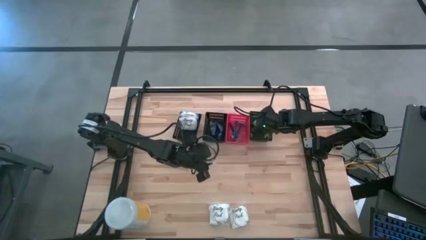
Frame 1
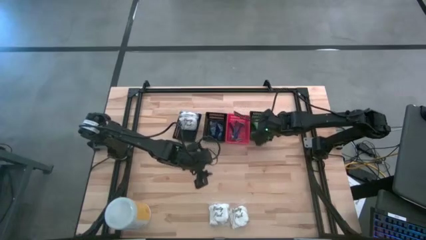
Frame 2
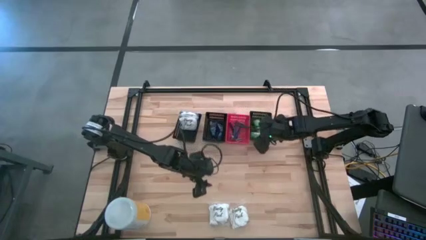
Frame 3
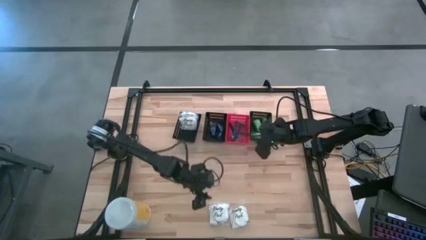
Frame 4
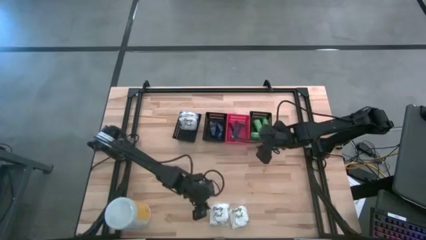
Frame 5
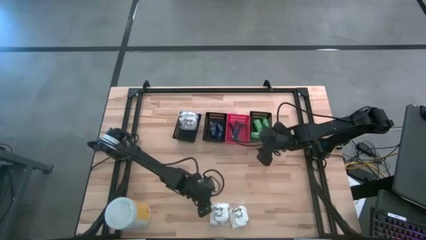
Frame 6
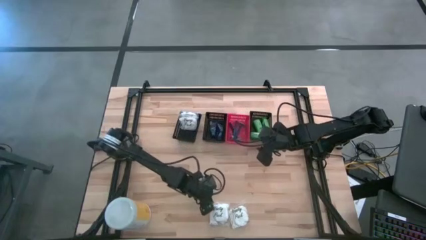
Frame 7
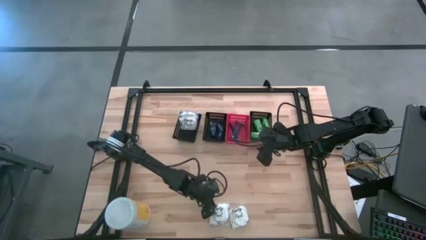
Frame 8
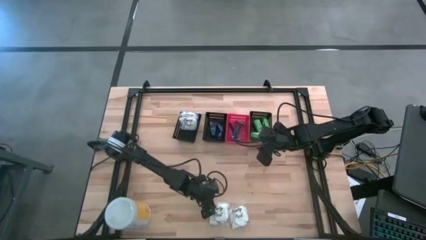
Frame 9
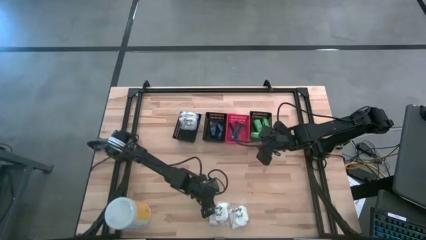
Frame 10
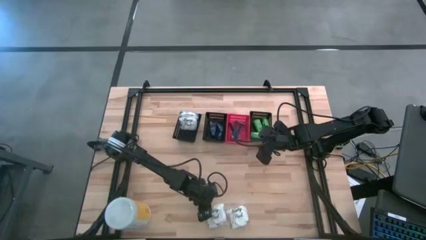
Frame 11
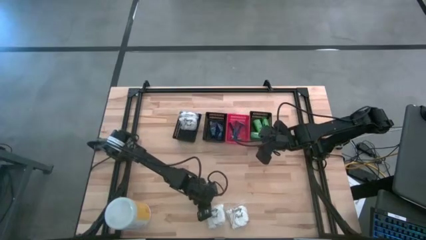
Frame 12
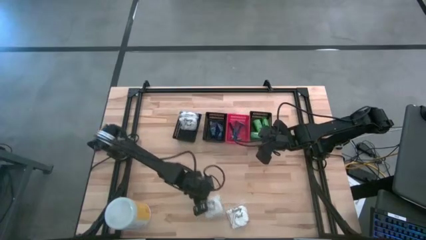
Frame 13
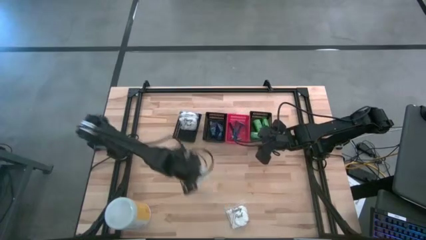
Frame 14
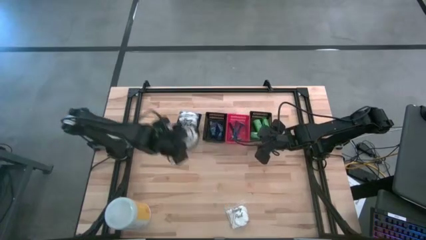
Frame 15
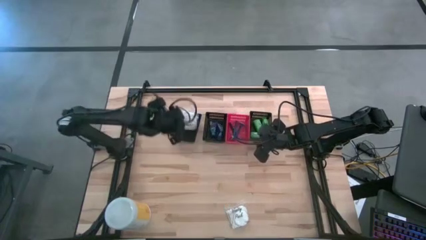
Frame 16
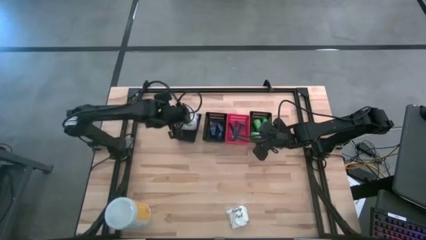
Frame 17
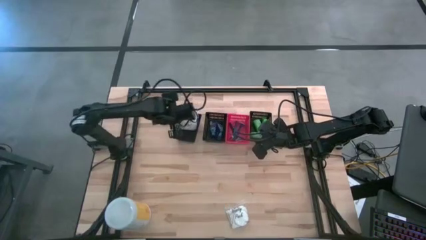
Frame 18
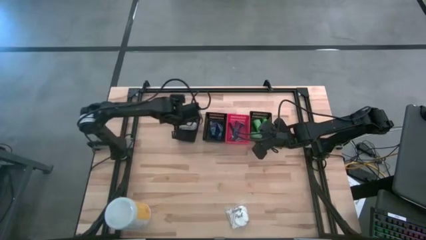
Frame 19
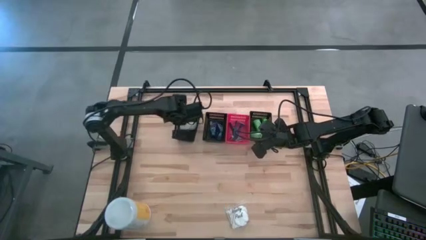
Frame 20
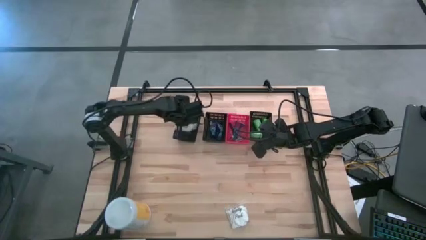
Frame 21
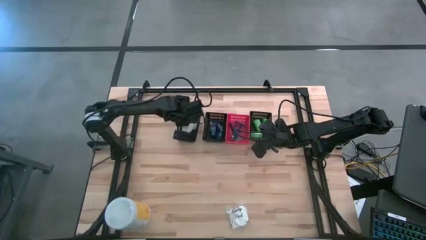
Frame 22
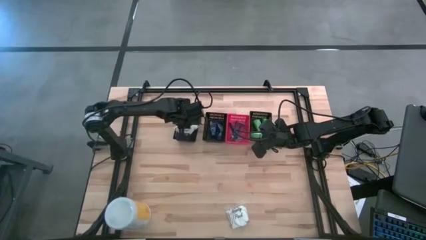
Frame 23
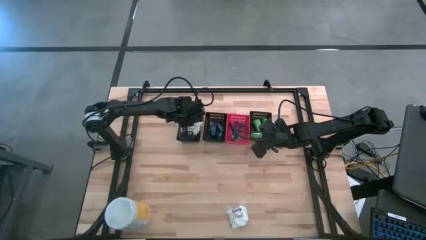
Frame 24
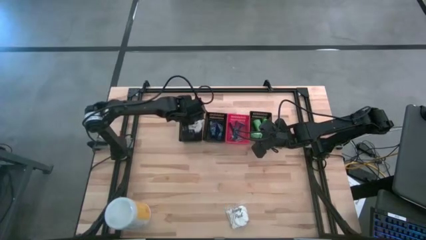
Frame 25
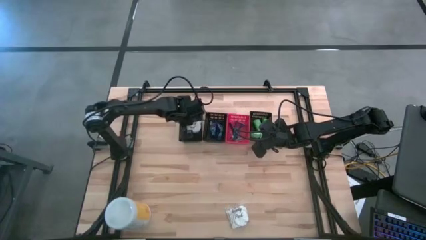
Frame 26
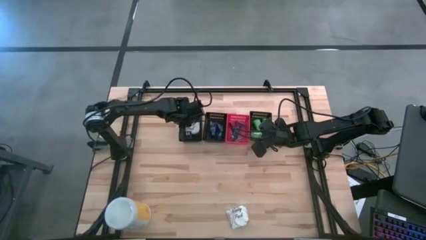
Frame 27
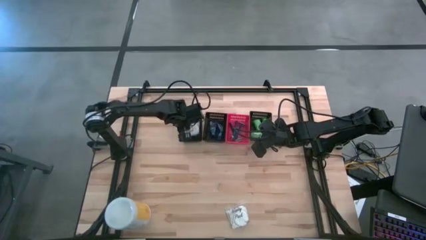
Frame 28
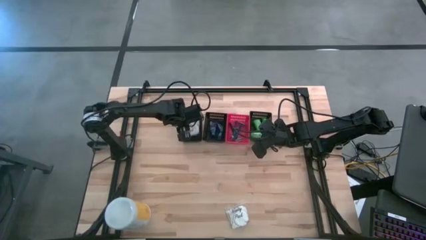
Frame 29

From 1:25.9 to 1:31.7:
Task: Pick & Place Travel size toiletries
Put the cotton pack into the left black bin

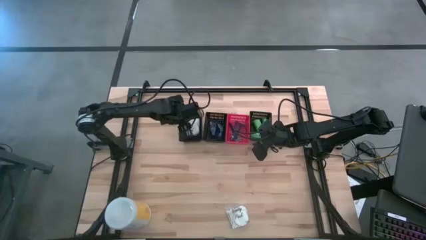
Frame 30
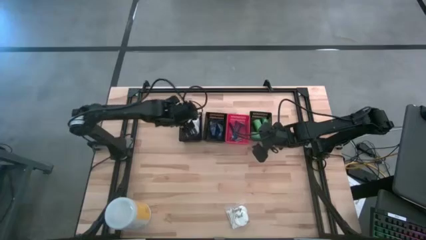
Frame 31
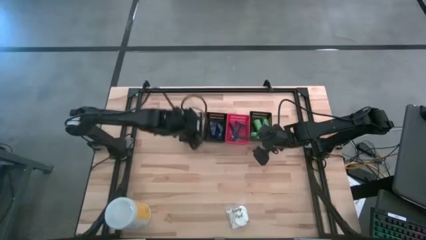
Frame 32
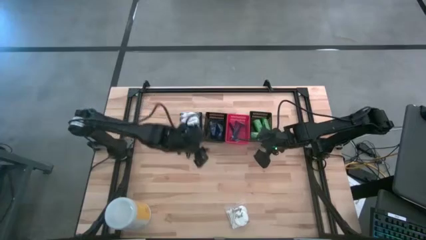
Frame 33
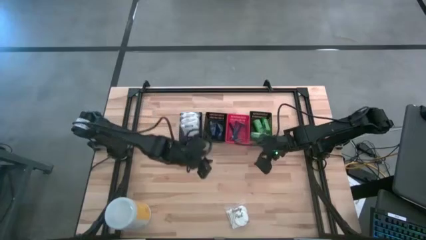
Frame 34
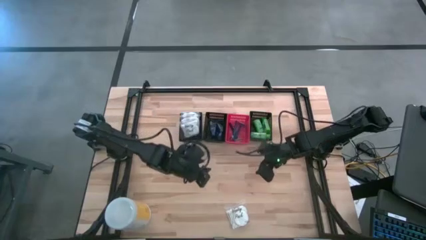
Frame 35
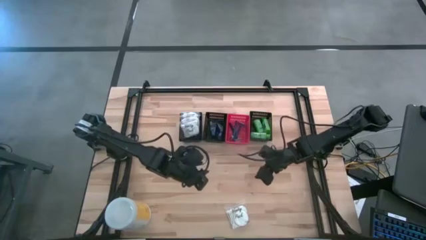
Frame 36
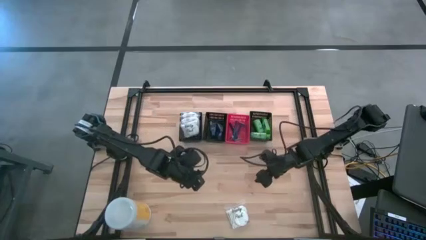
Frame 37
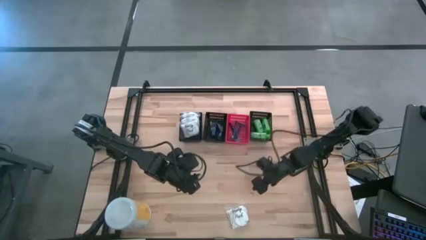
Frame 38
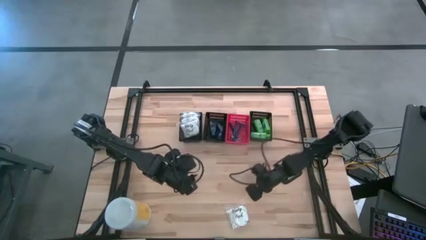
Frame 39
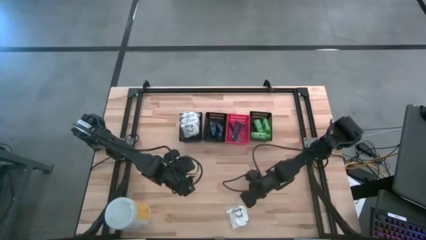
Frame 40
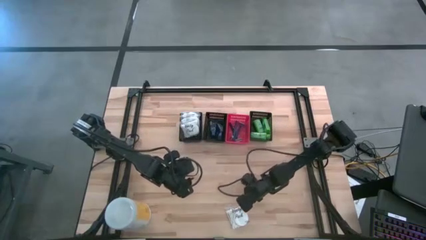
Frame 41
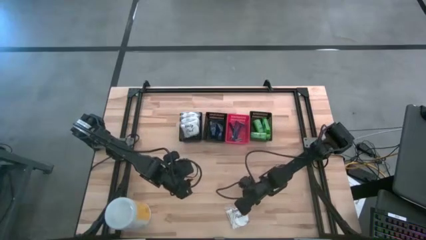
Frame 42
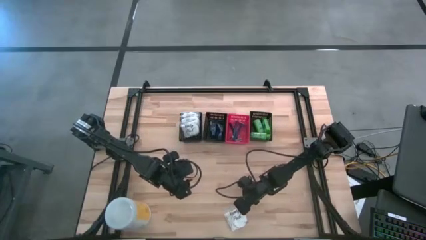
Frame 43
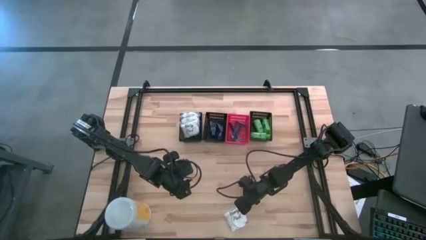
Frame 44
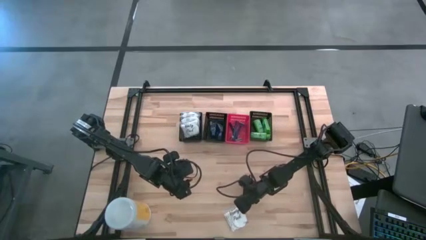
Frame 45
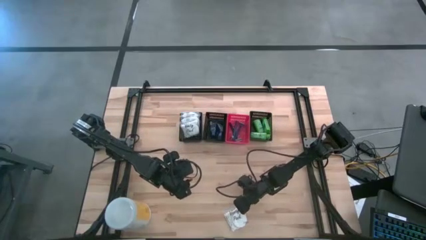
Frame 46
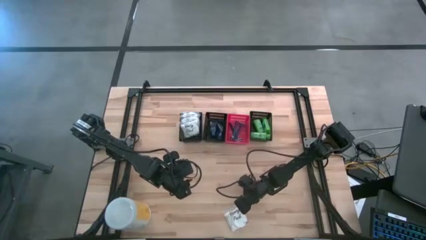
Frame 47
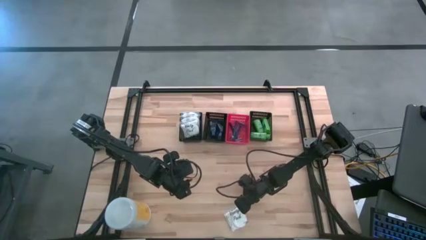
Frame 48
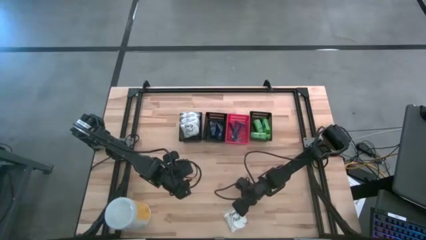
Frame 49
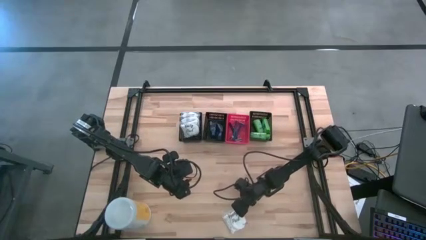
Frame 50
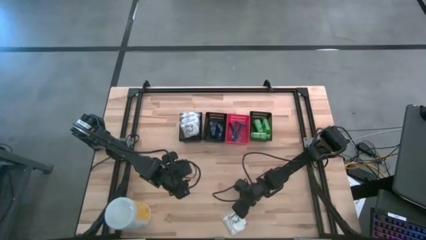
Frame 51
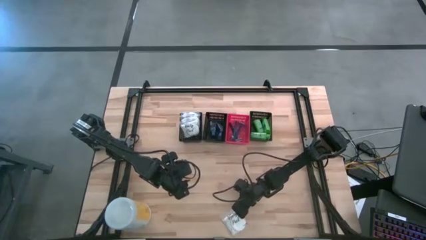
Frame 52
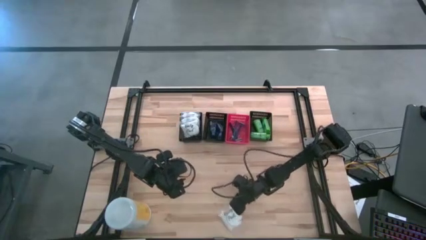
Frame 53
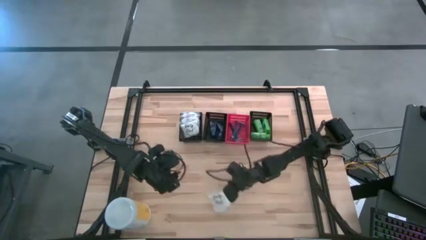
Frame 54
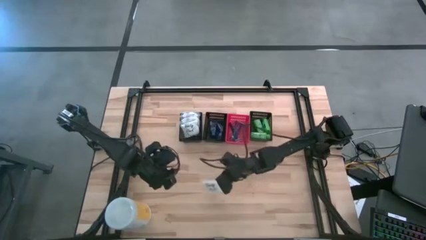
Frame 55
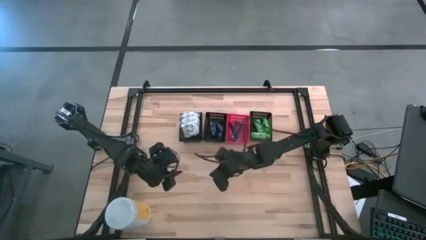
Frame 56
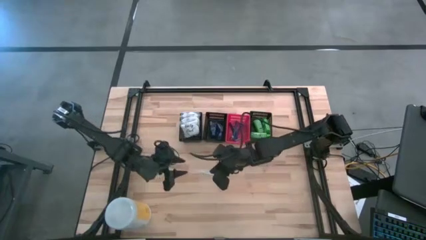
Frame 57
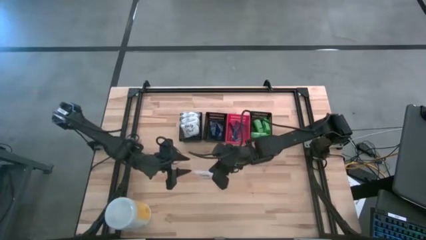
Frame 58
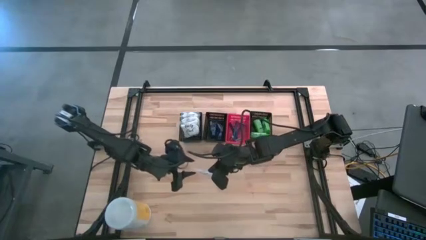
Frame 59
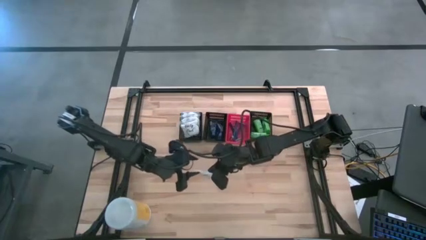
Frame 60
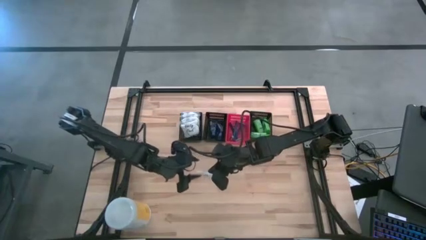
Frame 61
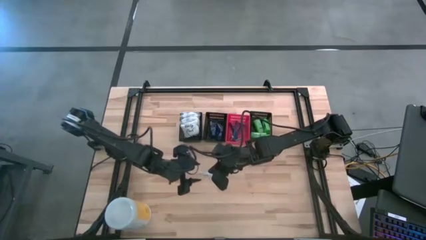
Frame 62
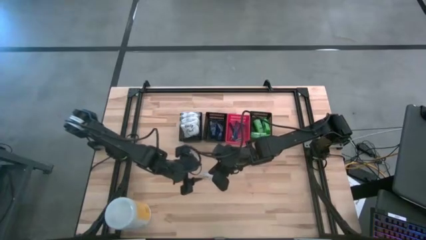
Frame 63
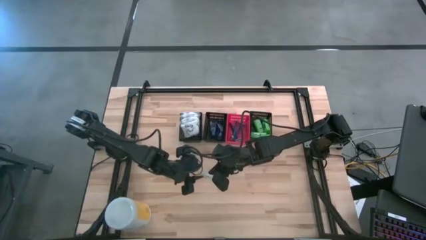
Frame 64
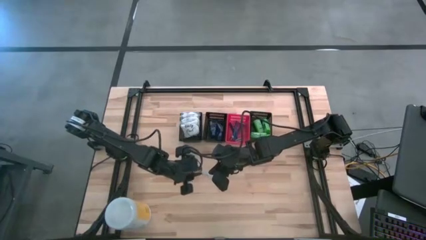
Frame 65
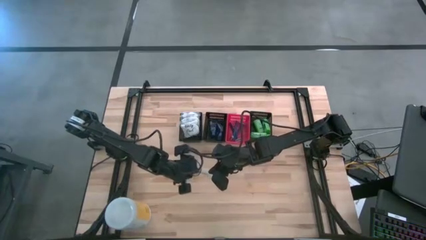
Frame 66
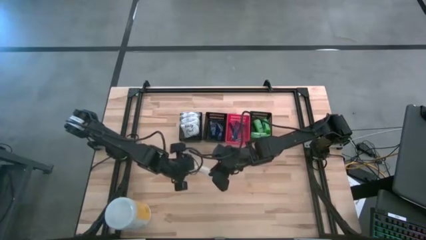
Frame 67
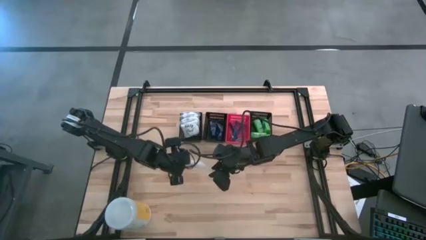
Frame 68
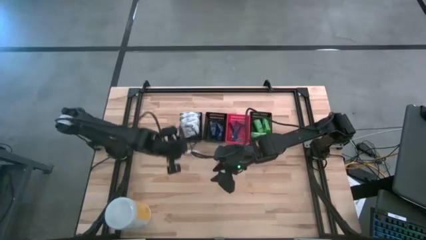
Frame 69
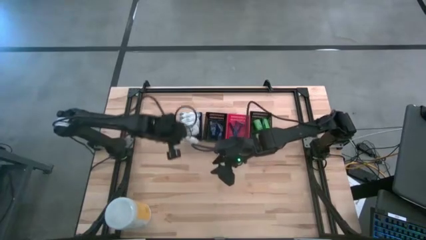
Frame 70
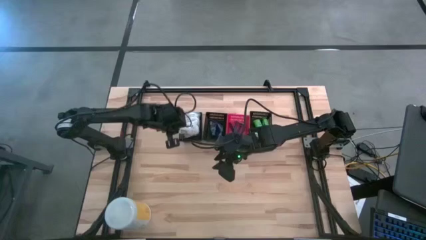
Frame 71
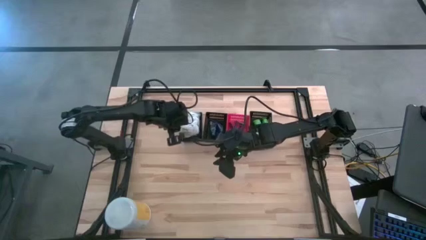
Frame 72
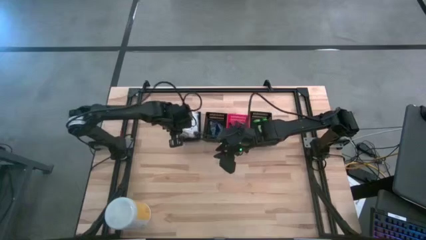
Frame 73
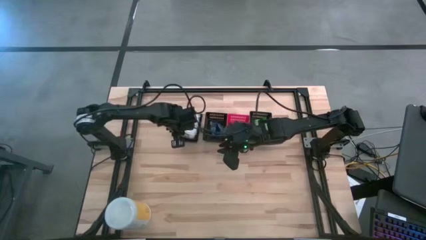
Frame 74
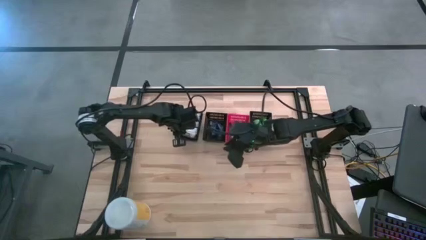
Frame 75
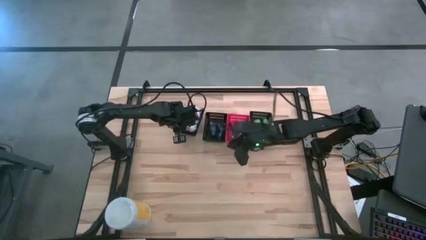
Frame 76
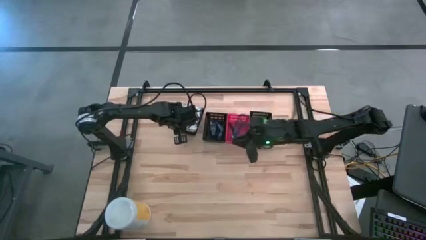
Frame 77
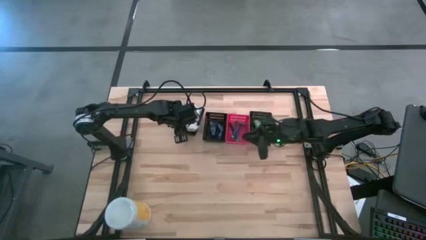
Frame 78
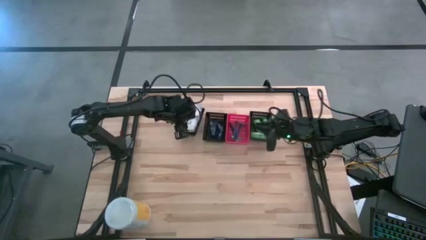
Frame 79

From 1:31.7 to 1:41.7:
Put the cotton pack into the left black bin

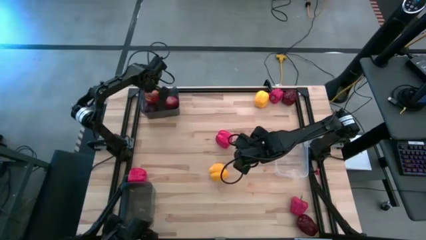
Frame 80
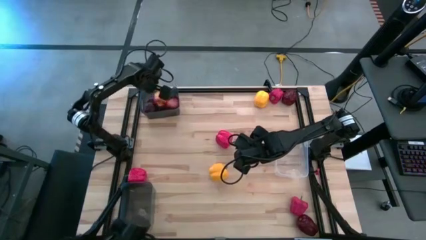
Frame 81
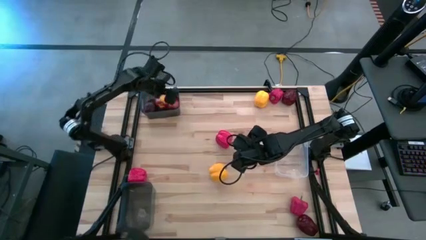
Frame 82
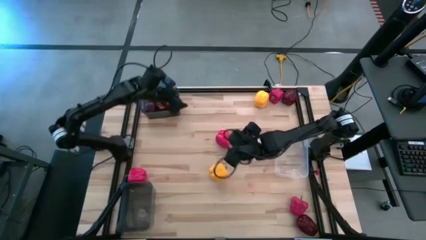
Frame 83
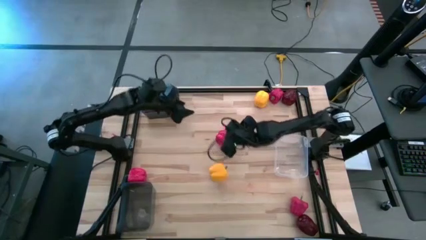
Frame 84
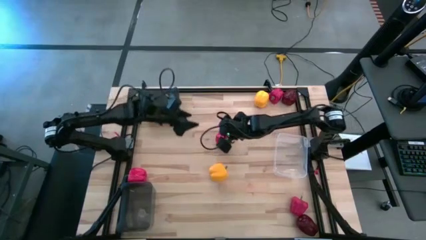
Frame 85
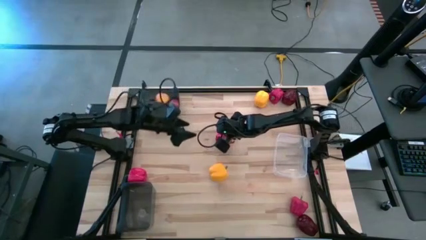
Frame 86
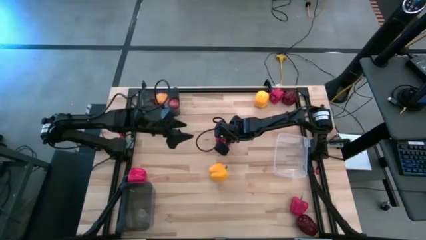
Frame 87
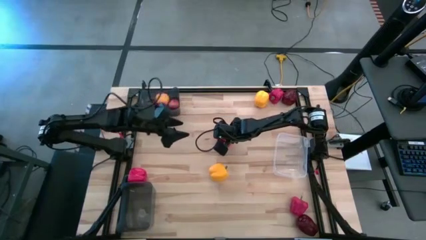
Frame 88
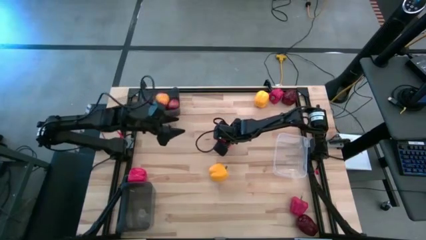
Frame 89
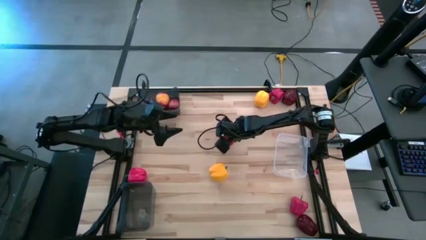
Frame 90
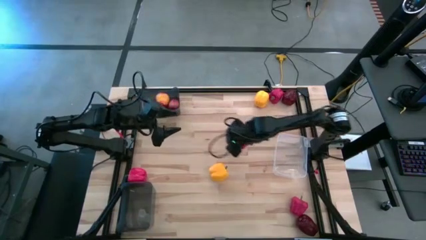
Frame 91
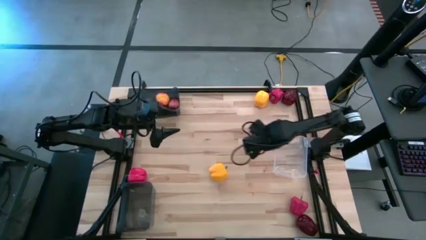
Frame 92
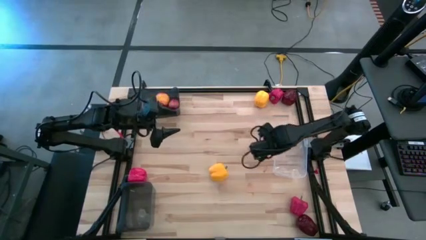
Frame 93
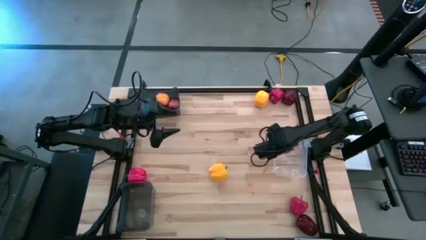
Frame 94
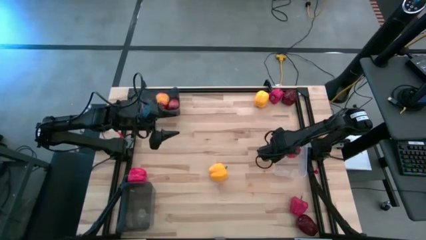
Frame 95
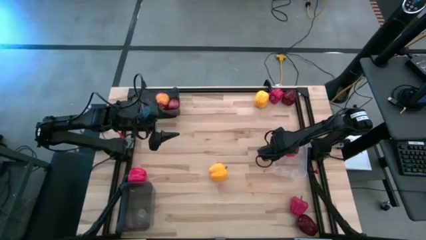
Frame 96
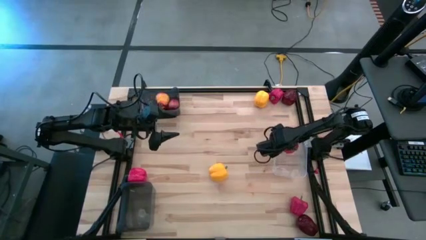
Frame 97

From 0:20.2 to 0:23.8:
Task: Sort produce into baskets
Put the red bell pepper into the transparent bin
